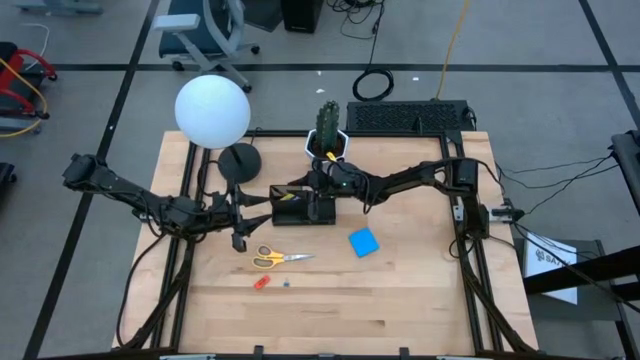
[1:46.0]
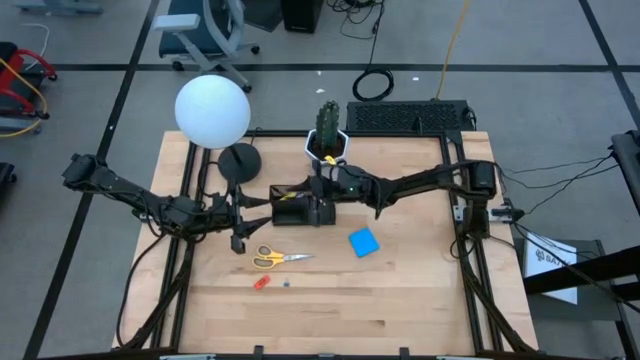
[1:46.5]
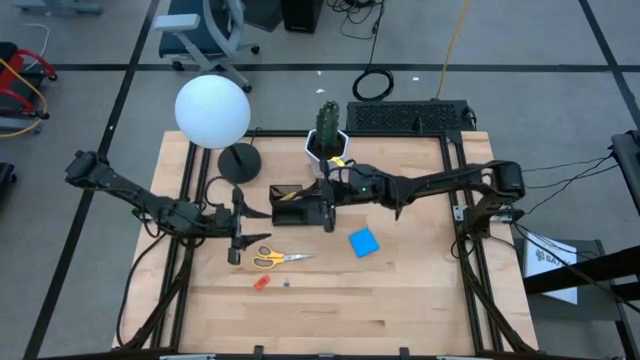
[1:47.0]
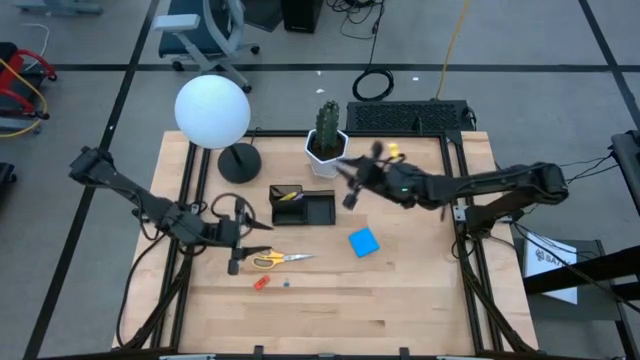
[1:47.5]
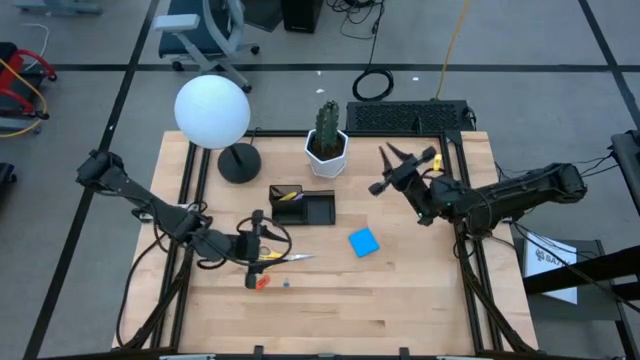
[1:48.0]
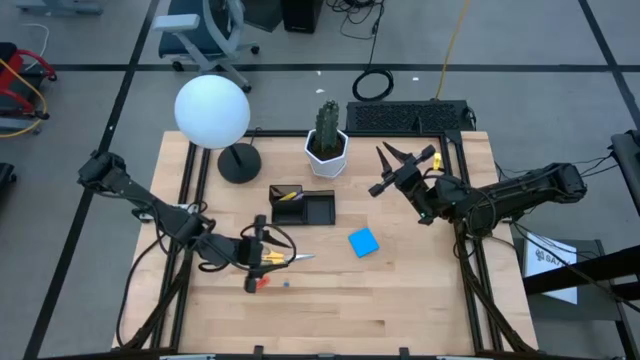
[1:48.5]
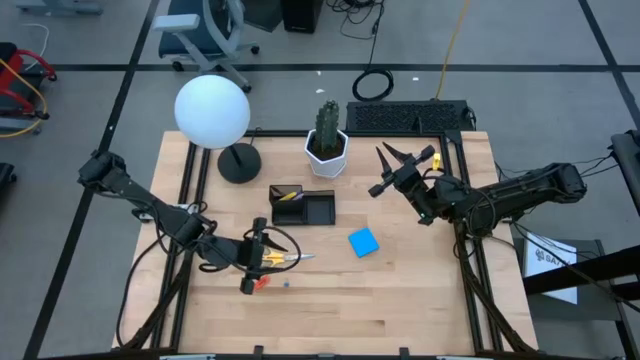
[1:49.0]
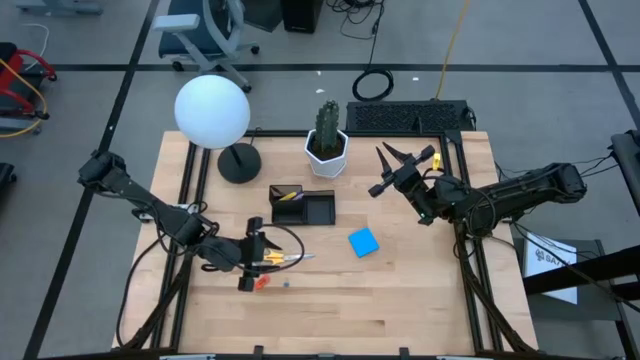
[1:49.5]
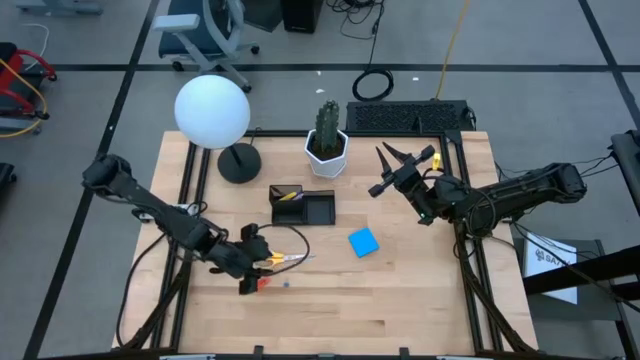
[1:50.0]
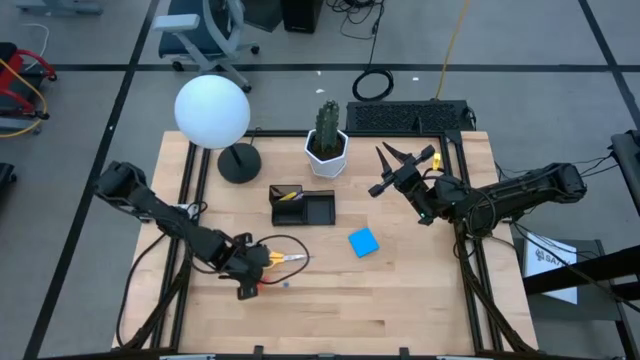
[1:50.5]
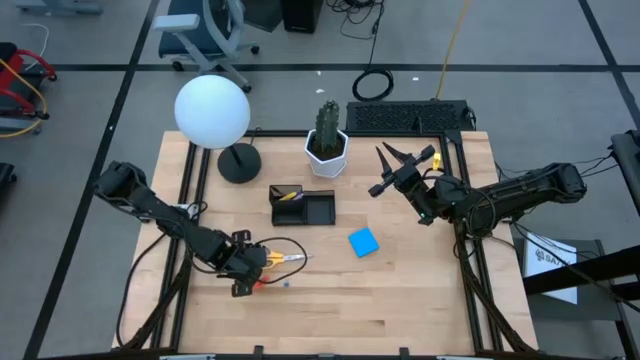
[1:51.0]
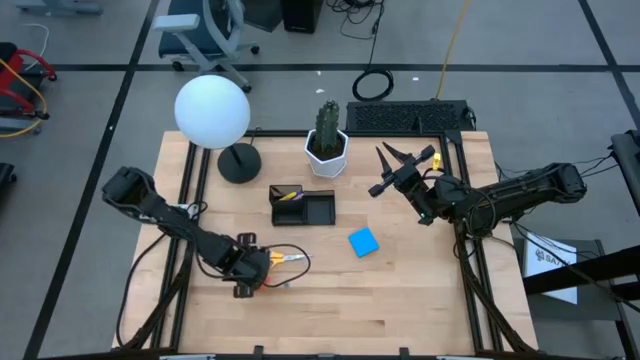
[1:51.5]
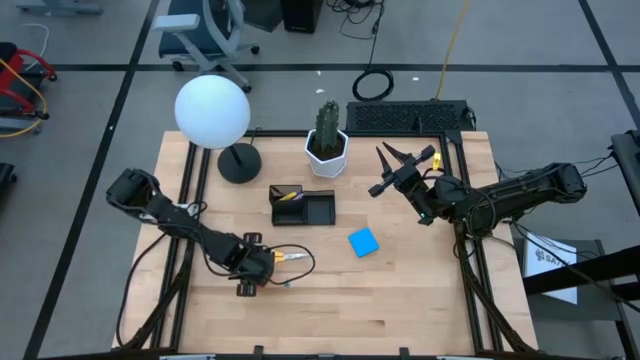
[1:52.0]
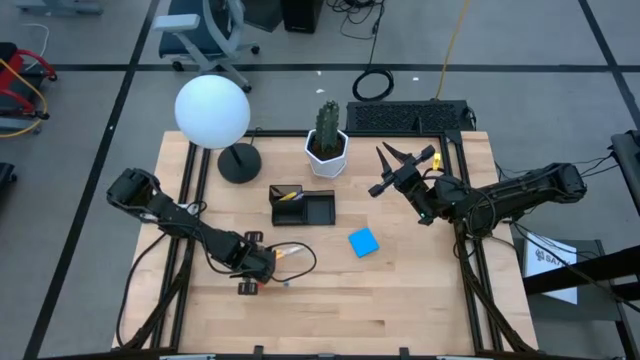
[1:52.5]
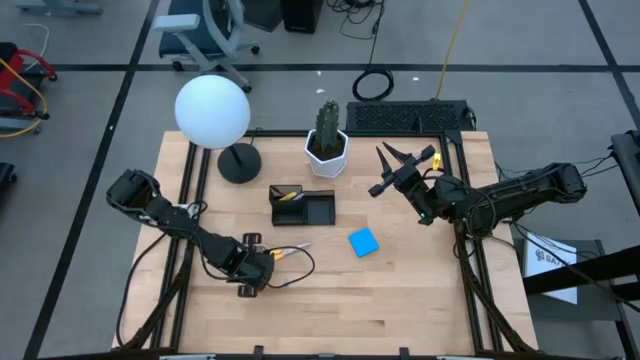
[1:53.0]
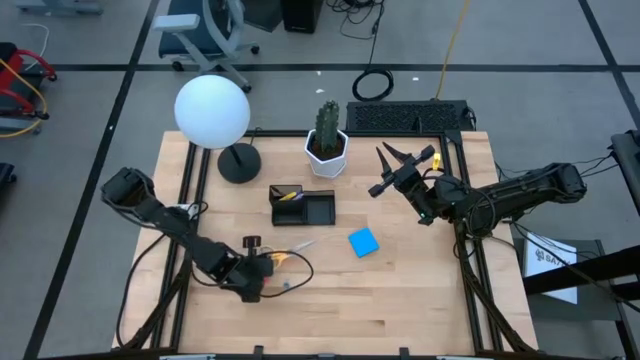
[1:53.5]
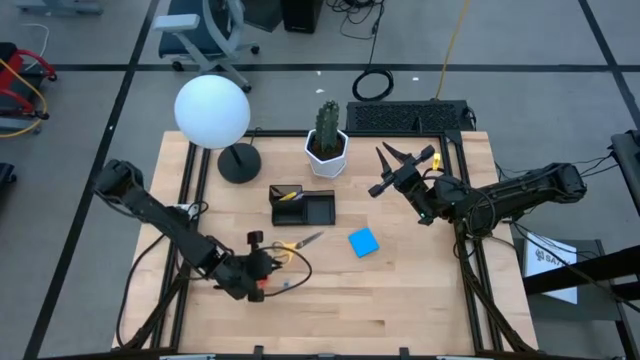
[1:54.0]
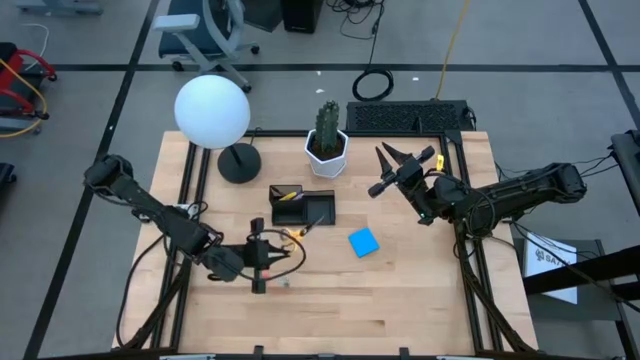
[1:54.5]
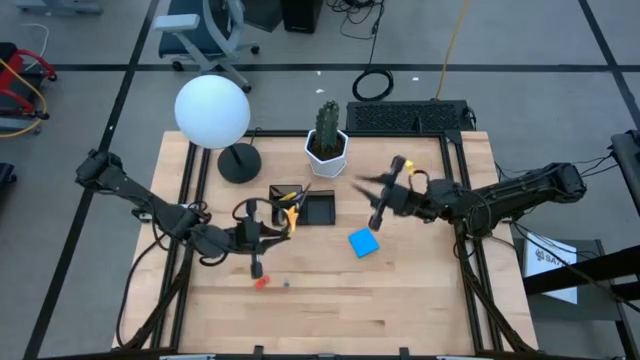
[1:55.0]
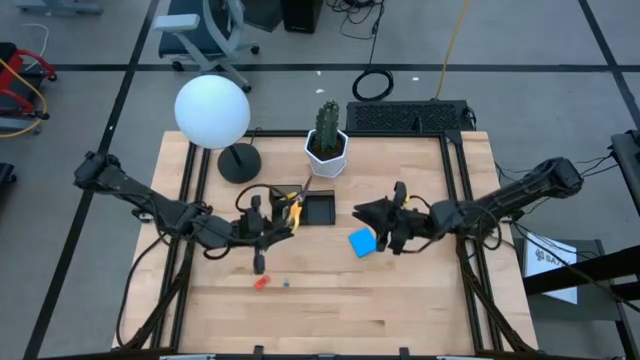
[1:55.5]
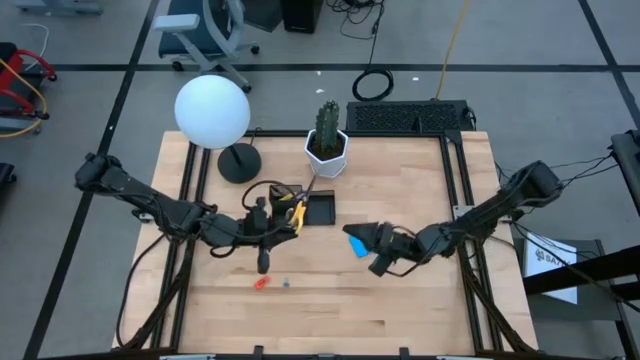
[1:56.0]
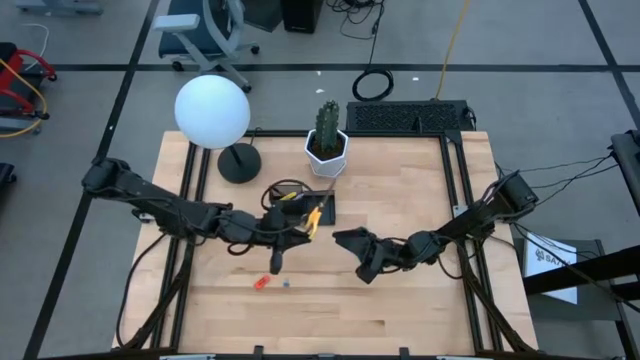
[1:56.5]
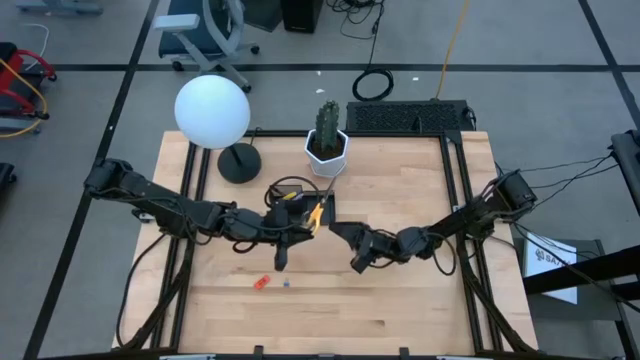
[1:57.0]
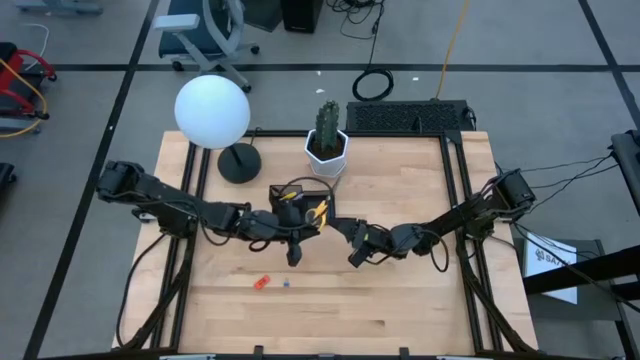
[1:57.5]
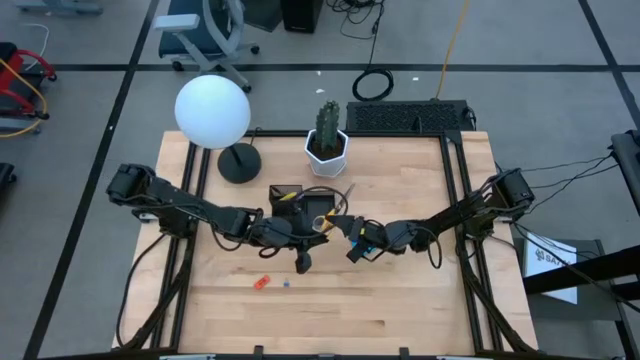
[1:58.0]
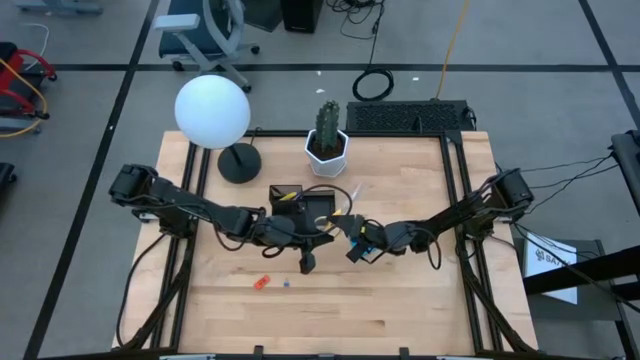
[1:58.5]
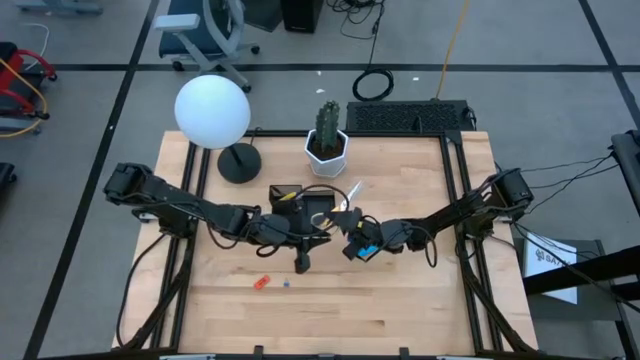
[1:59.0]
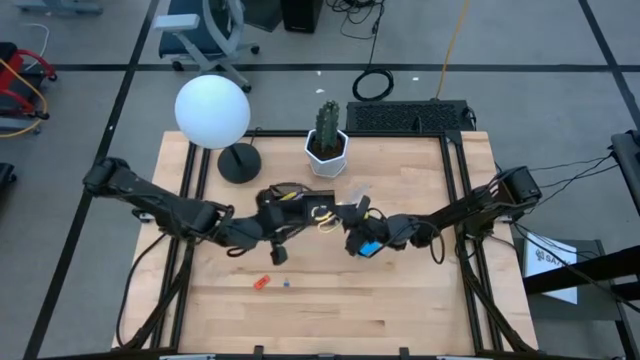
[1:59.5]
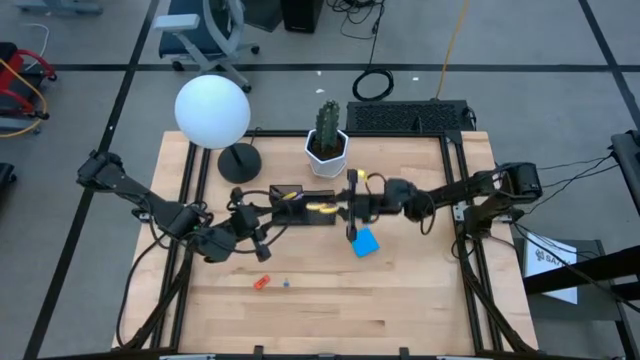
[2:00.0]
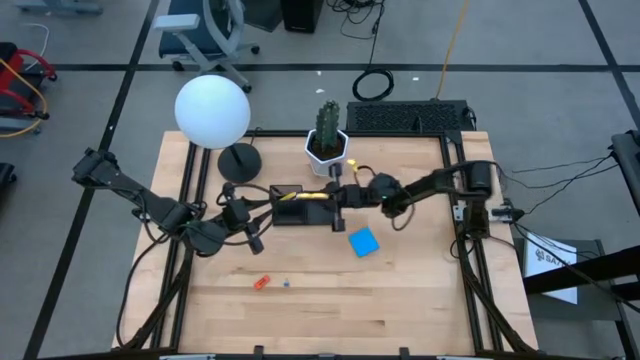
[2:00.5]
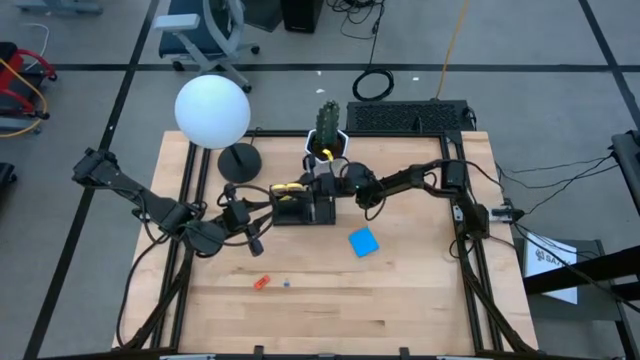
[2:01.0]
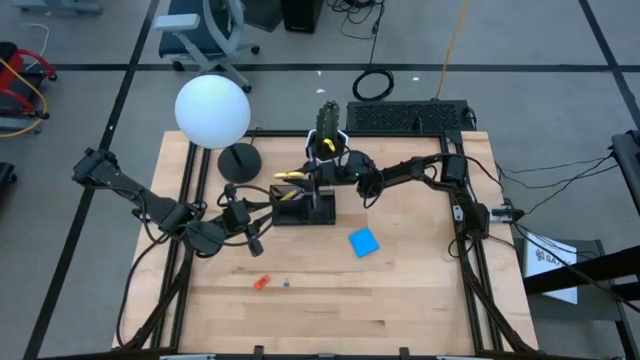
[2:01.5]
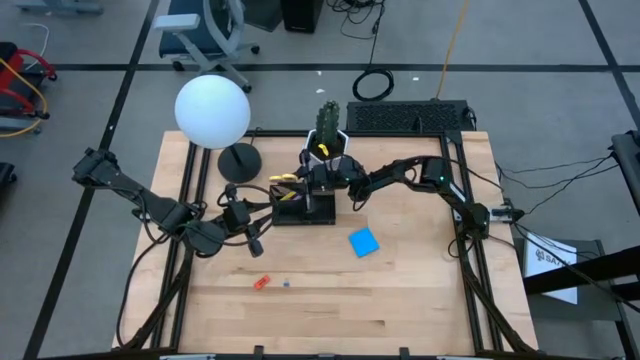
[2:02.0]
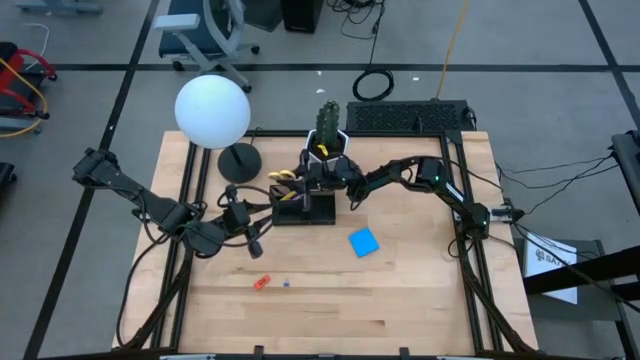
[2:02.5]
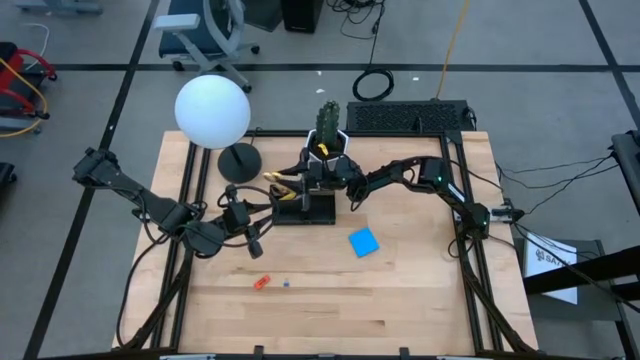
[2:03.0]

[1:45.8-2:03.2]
Task: Pick and place office supplies into organizer
Put the scissor into the desk organizer

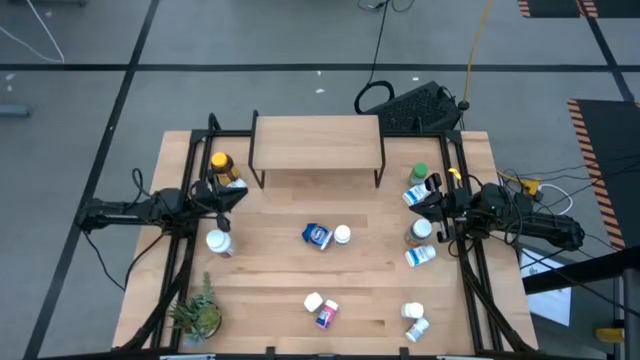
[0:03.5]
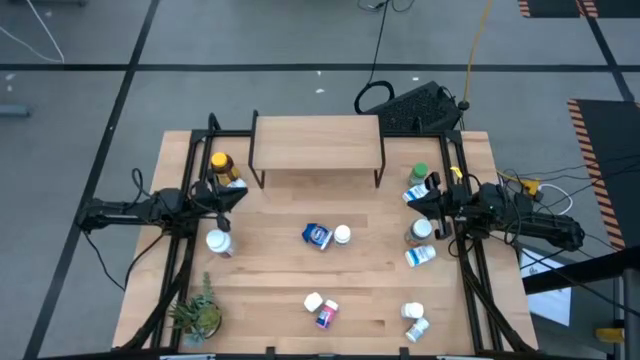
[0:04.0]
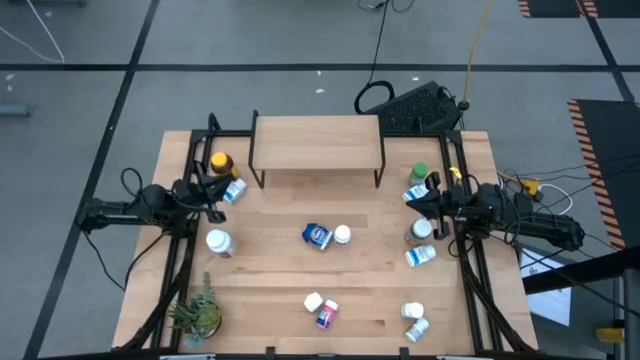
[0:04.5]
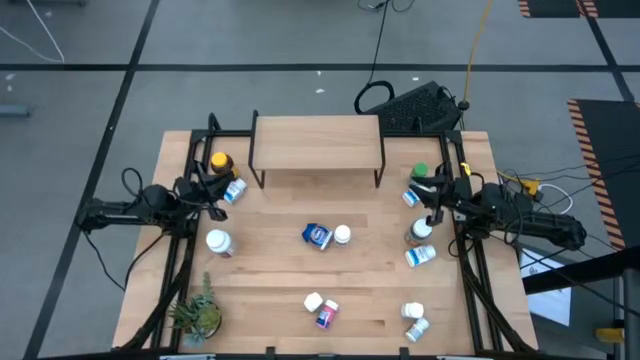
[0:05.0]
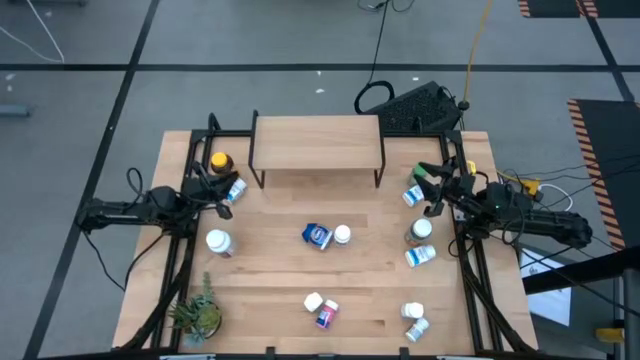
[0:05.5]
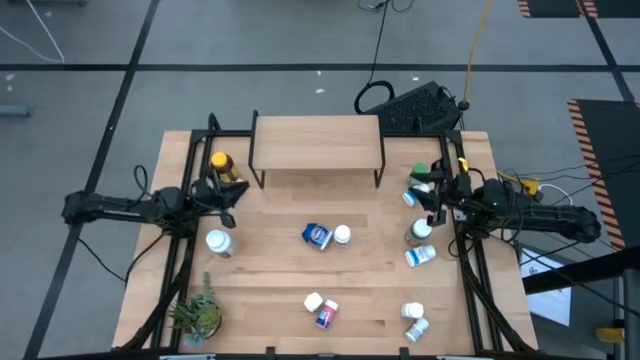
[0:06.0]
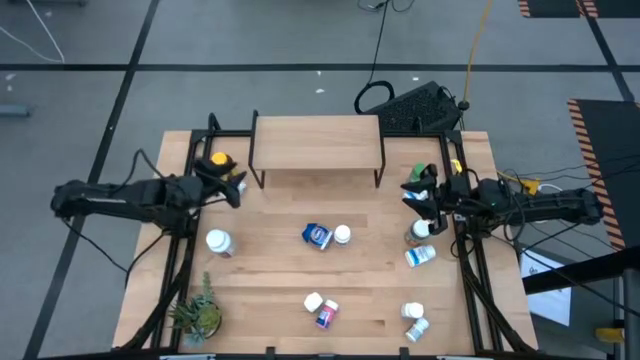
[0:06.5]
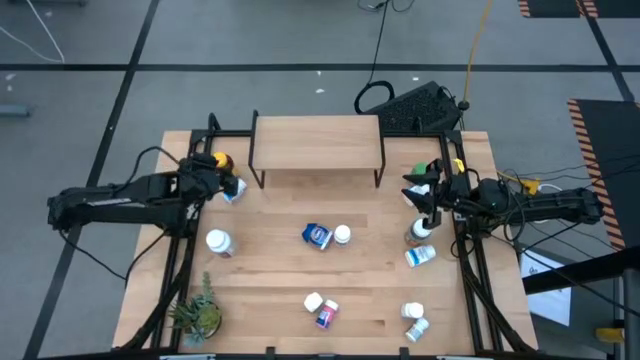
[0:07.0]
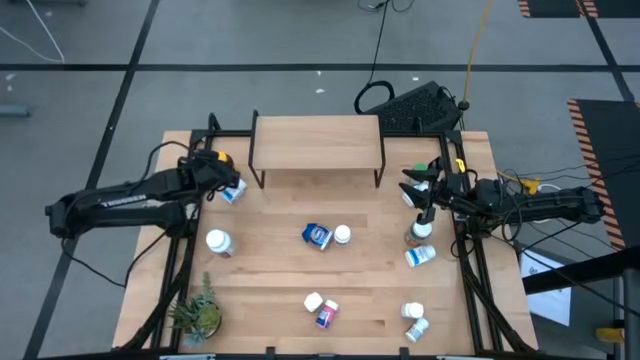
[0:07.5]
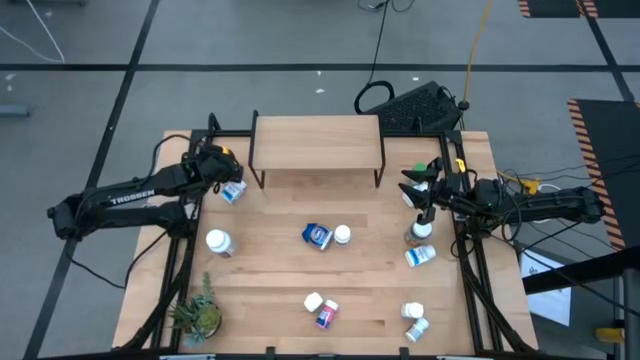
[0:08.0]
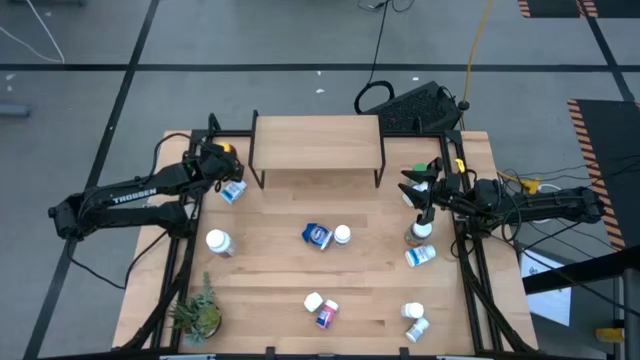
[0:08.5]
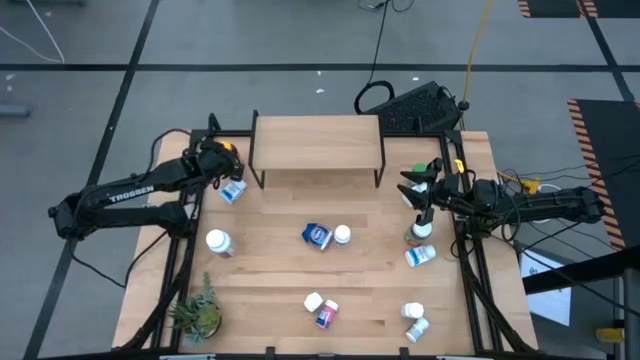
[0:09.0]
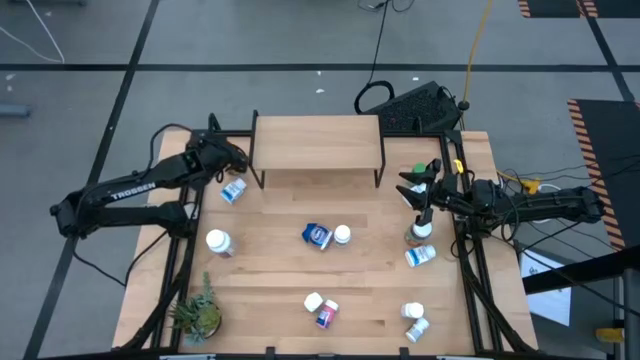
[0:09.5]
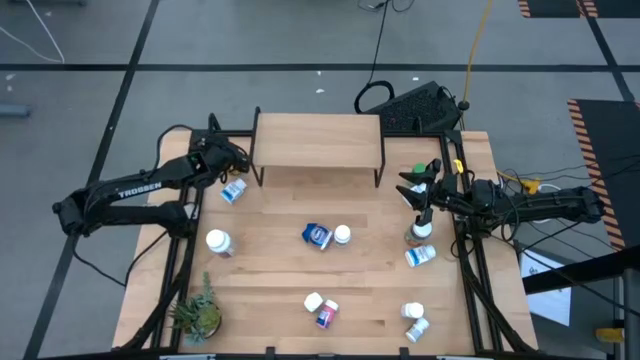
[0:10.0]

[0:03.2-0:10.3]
Task: Pick and place medicine bottles onto shelf by color
Put the yellow medicine bottle on the shelf
